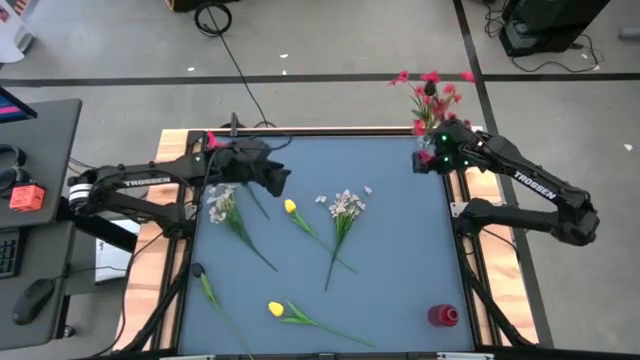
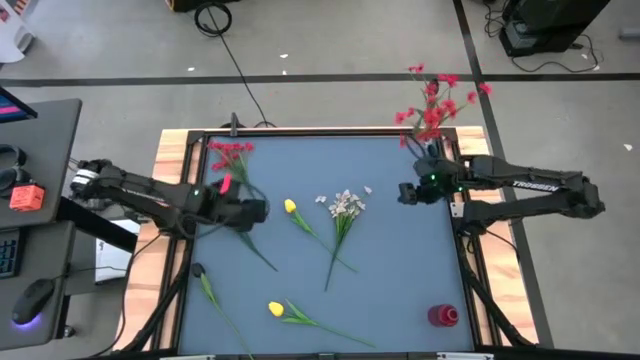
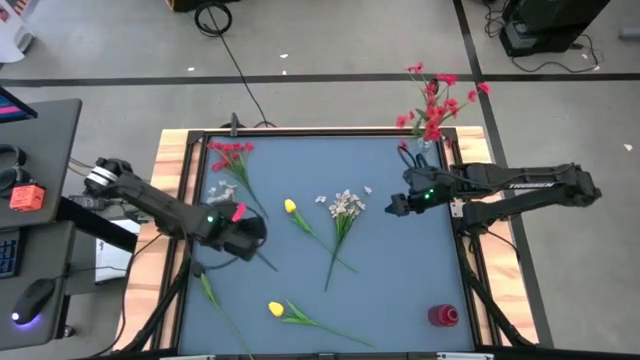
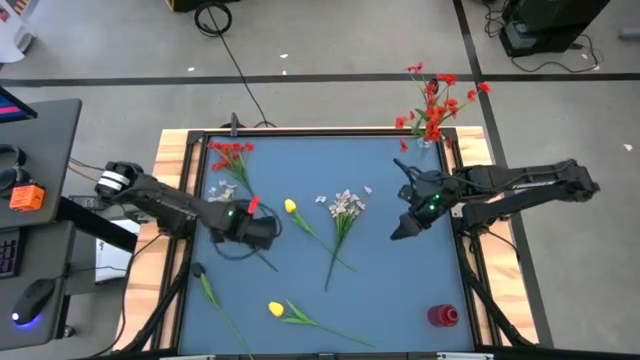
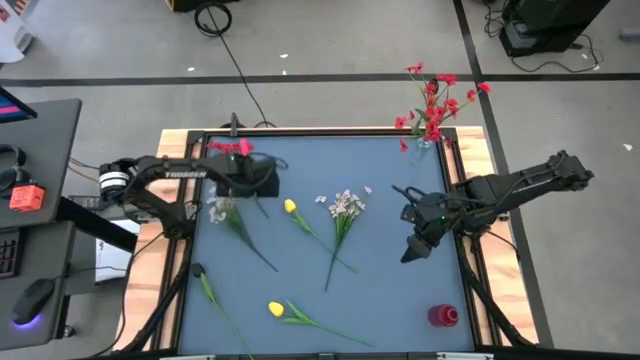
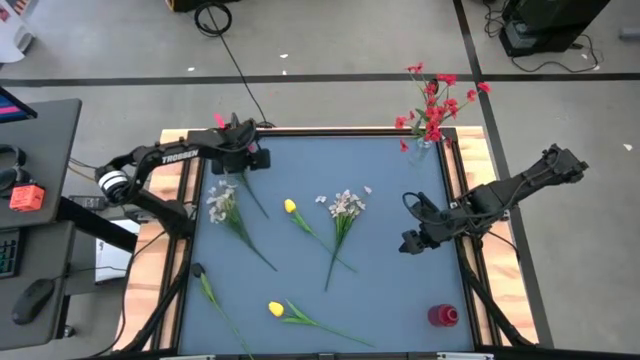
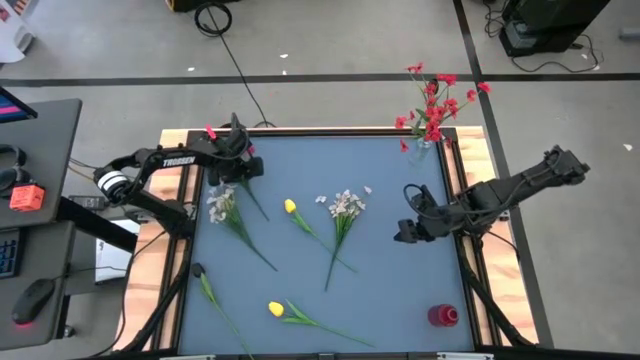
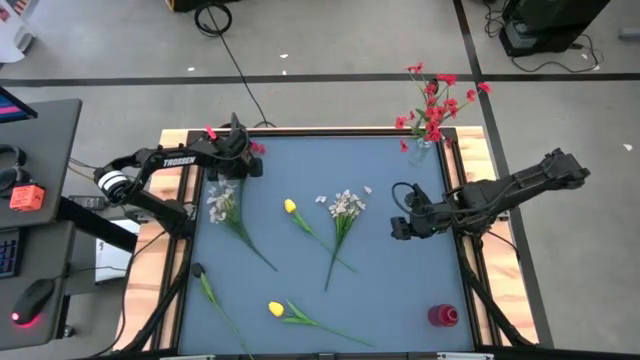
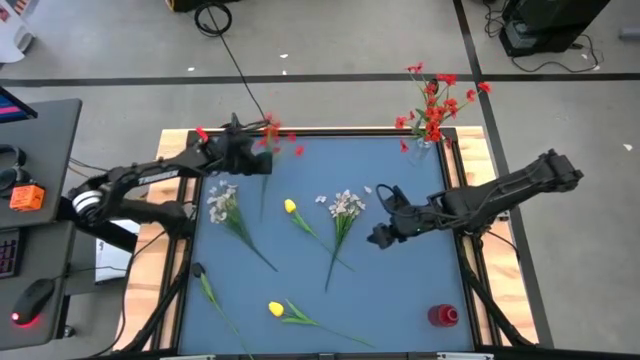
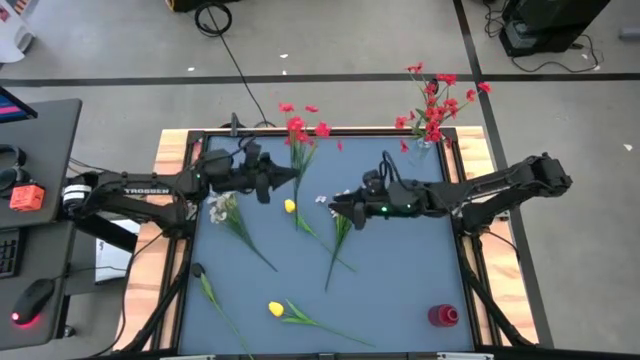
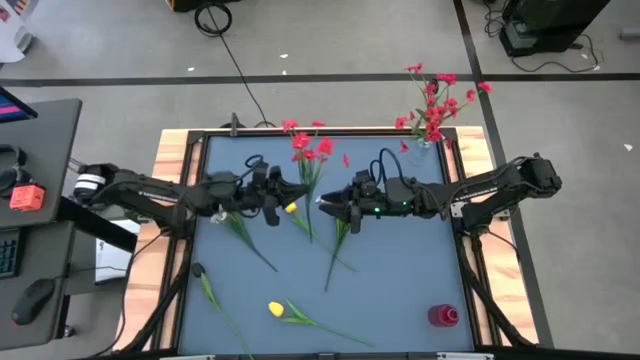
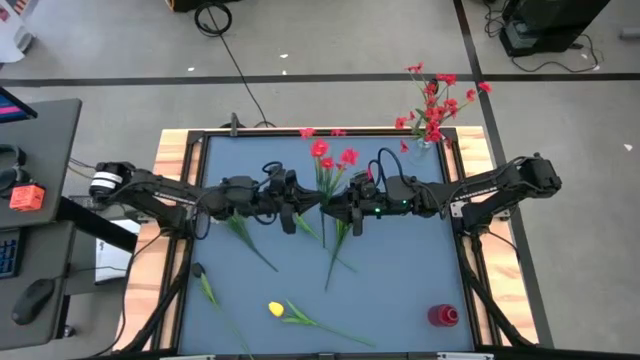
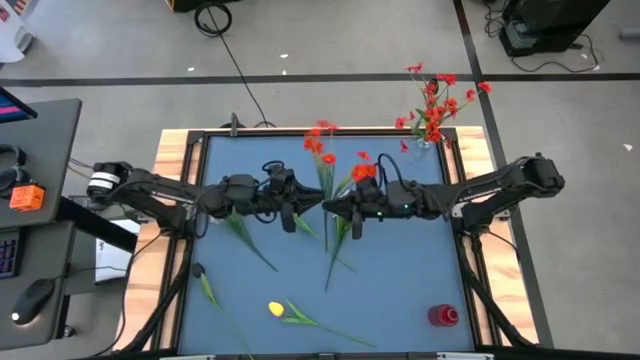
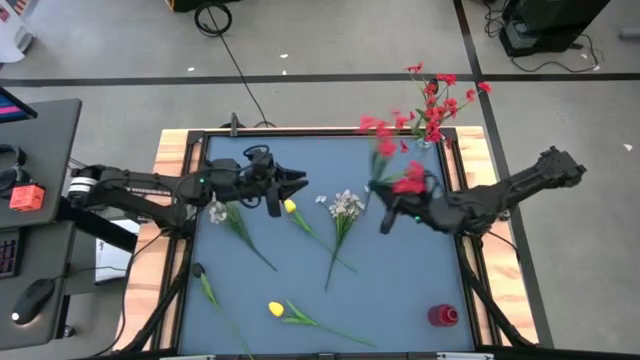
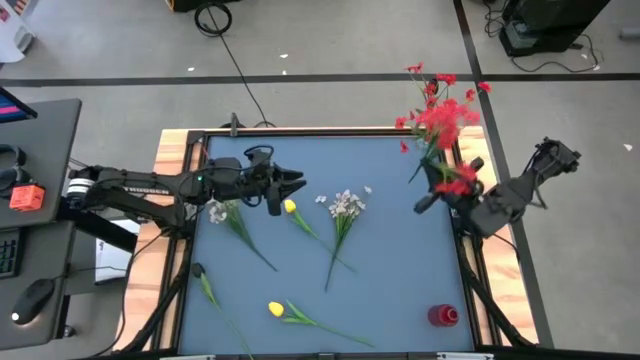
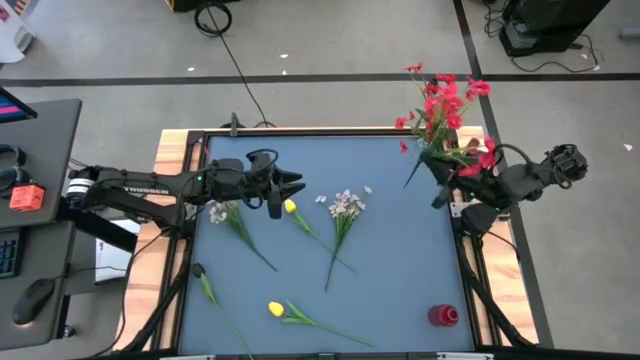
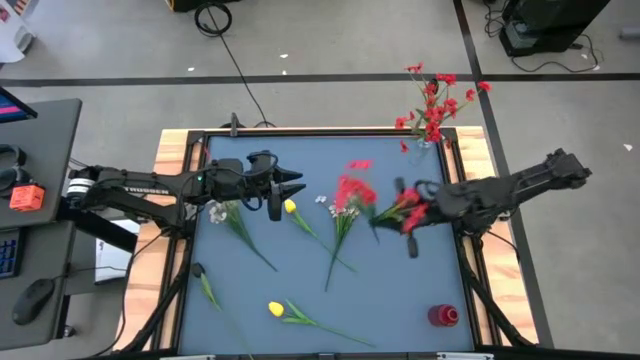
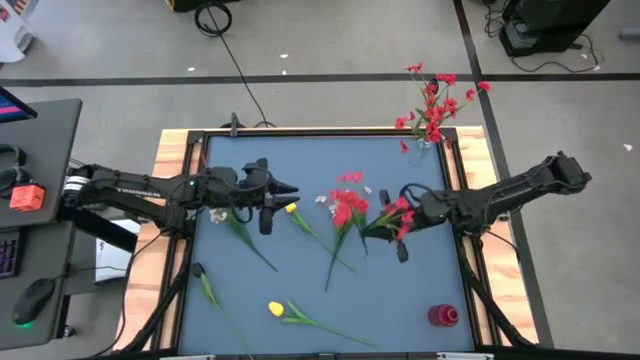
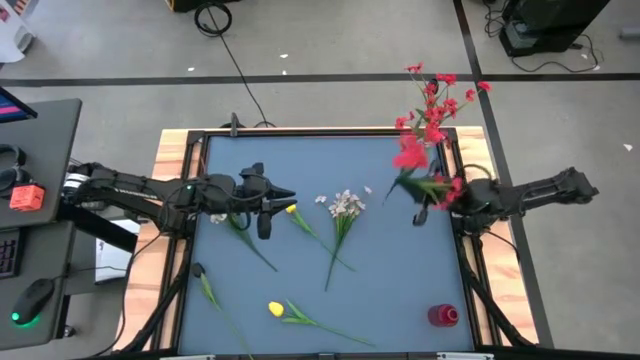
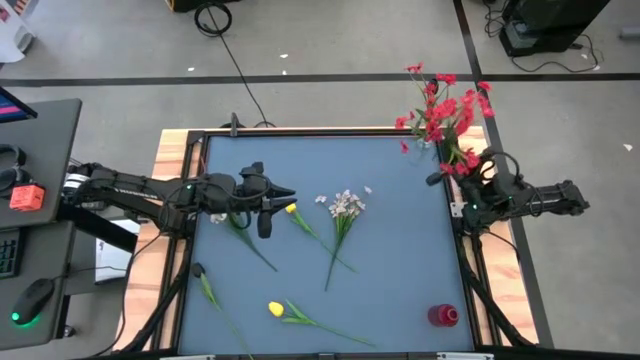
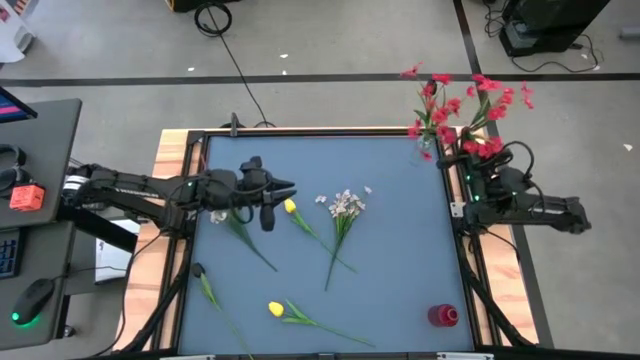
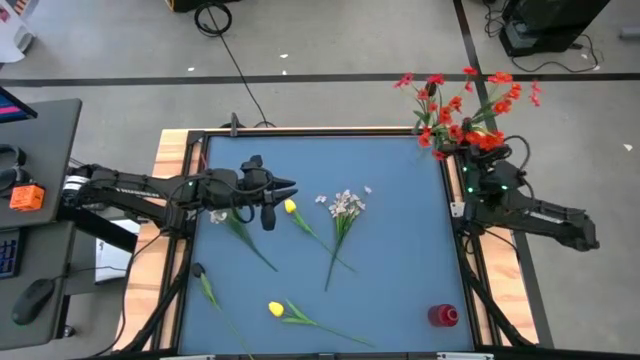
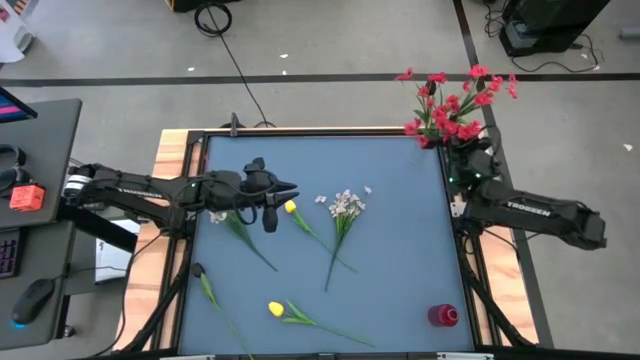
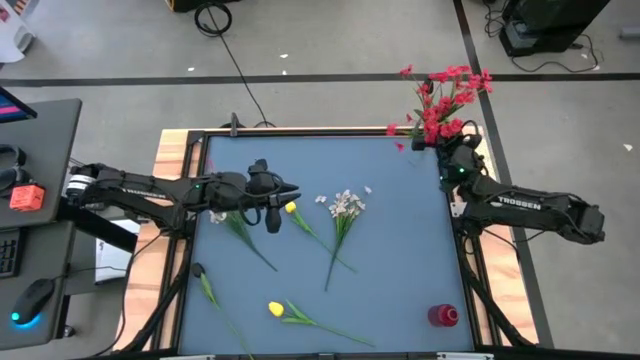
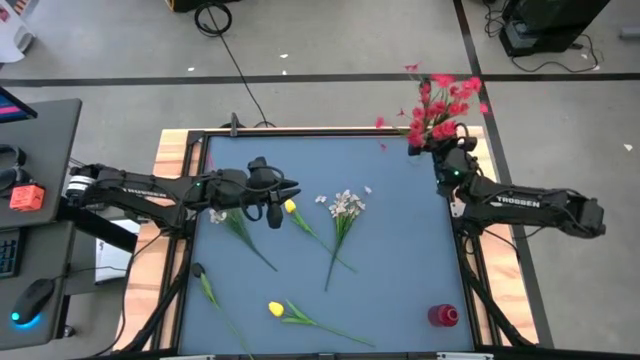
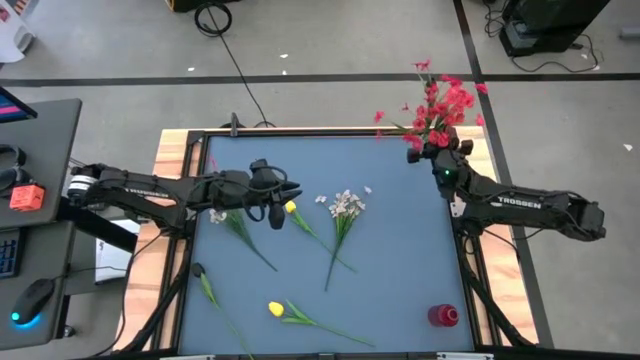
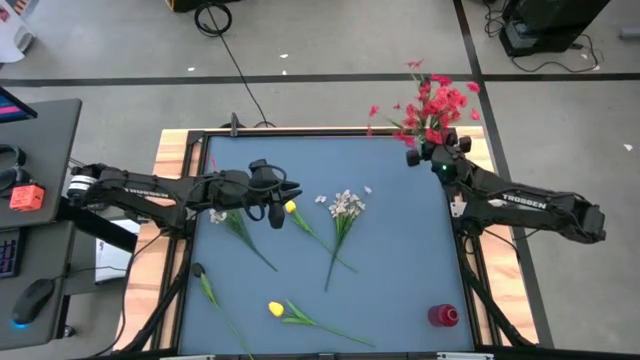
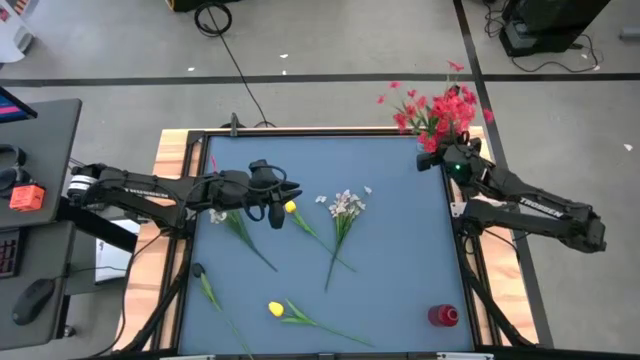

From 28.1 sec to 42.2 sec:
Task: Sort flowers into vase by color
Put the red flowers into the transparent vase

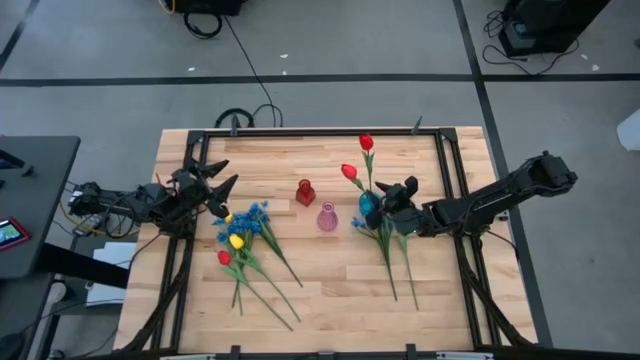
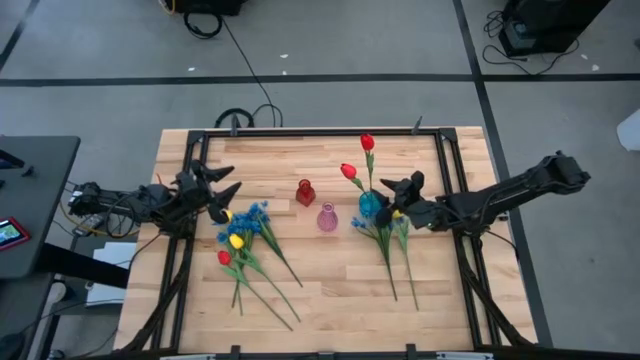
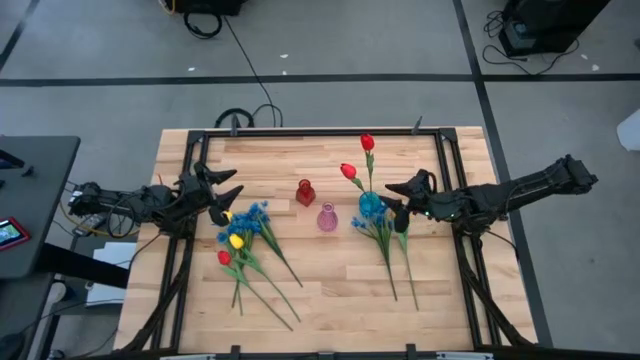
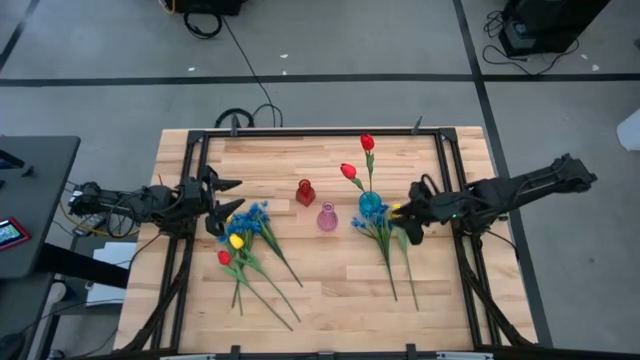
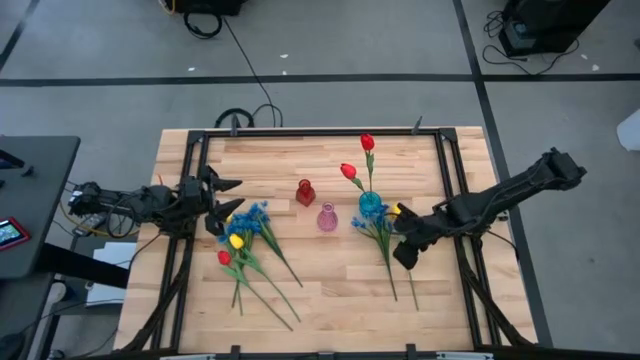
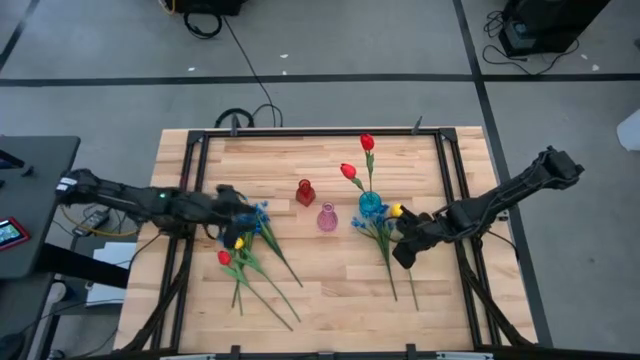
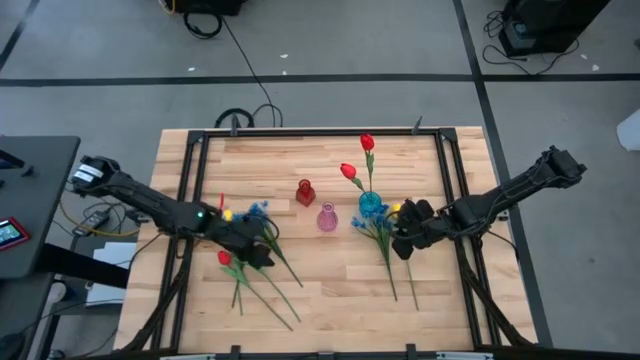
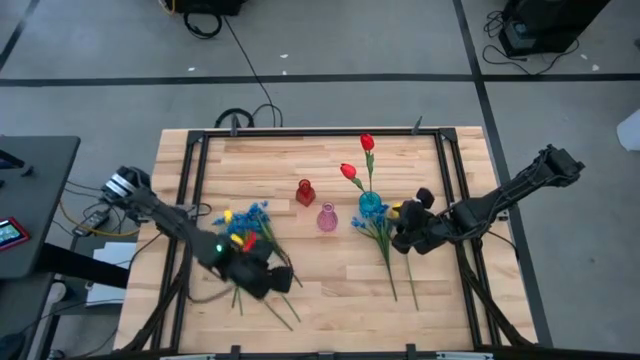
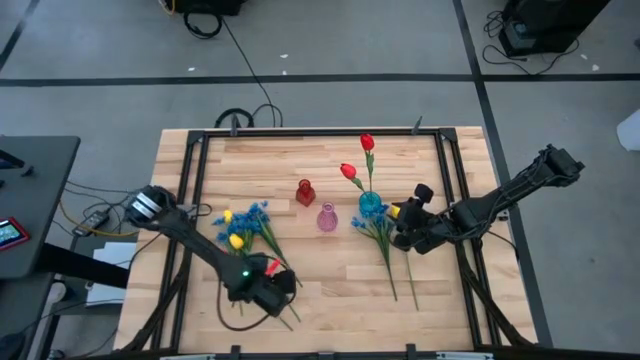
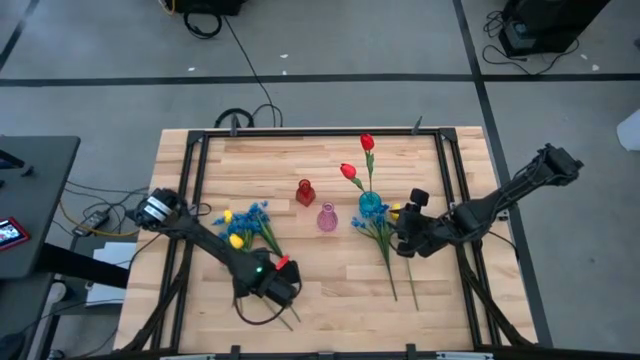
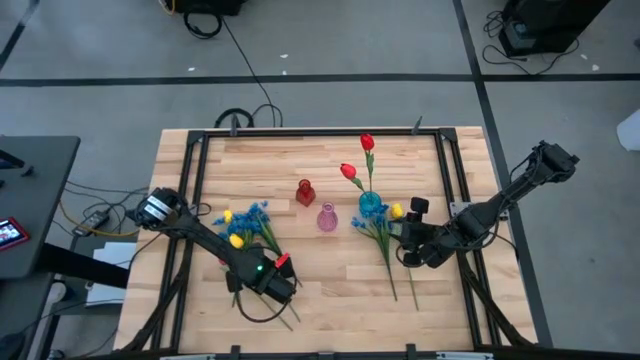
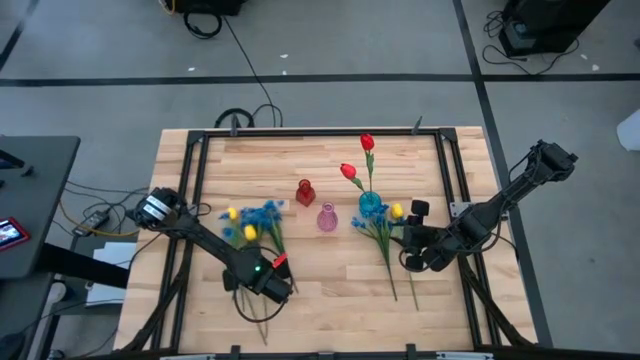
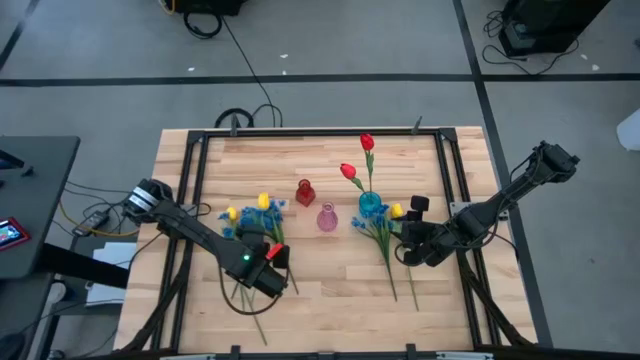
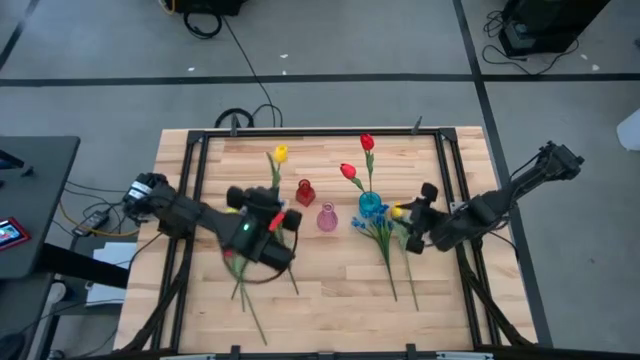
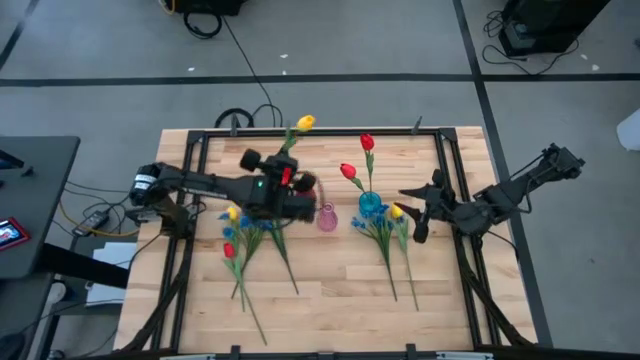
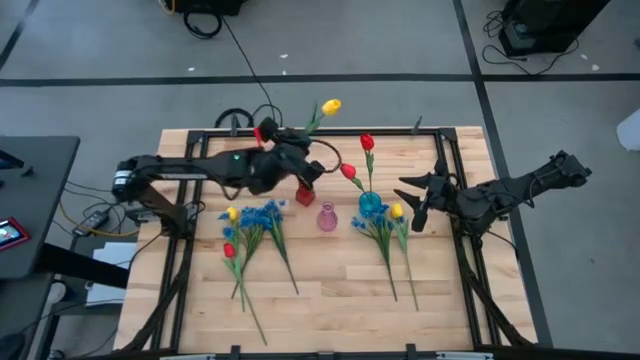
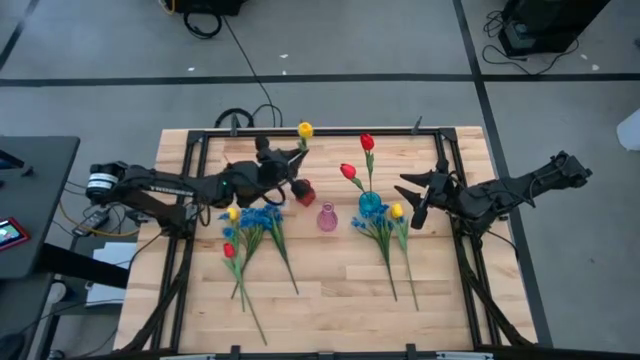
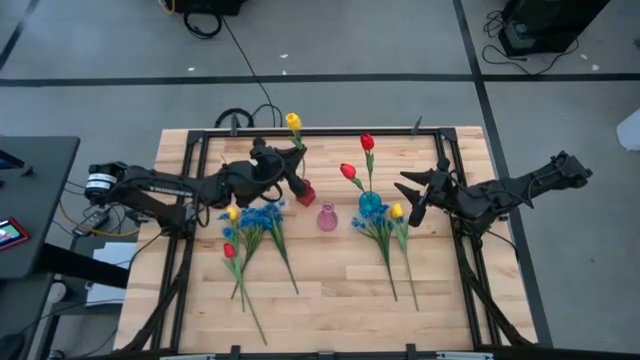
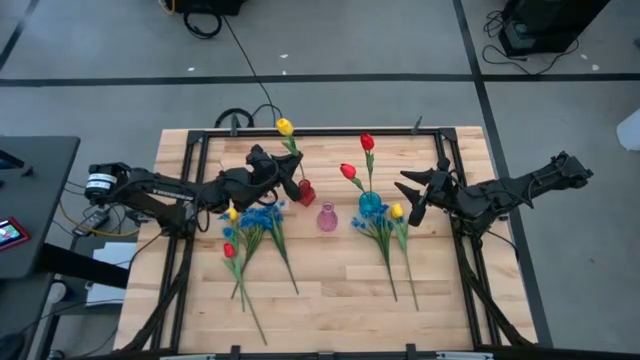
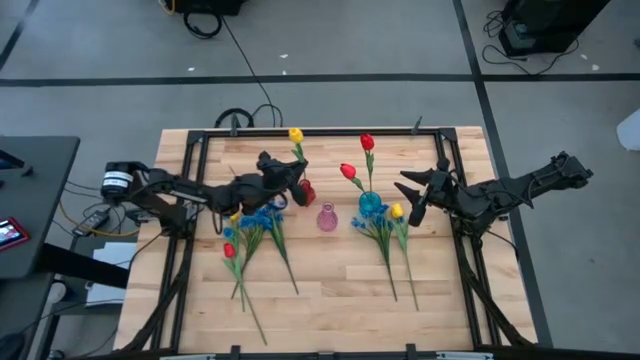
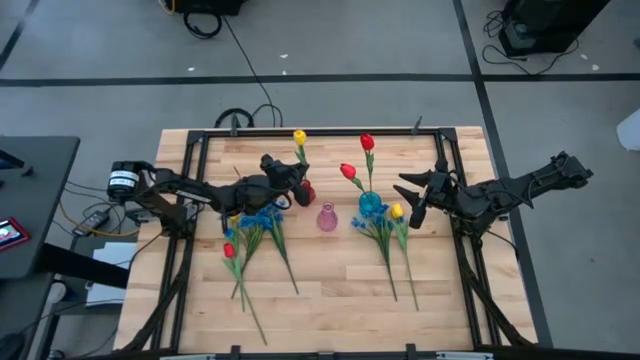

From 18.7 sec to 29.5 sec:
Task: Sort flowers into vase by color
Put the yellow tulip into the red transparent vase
